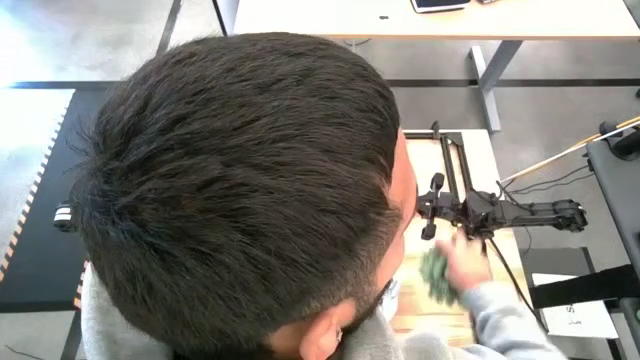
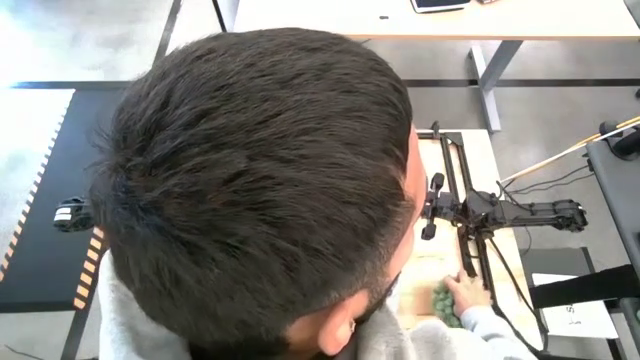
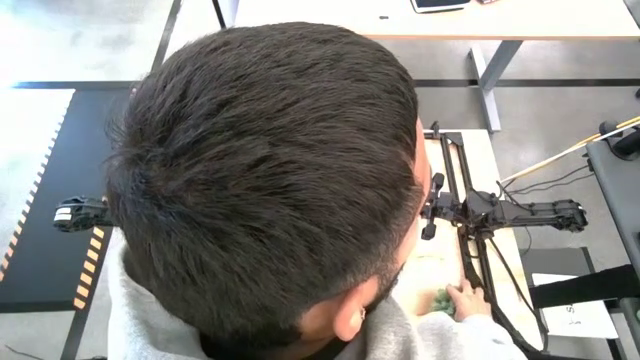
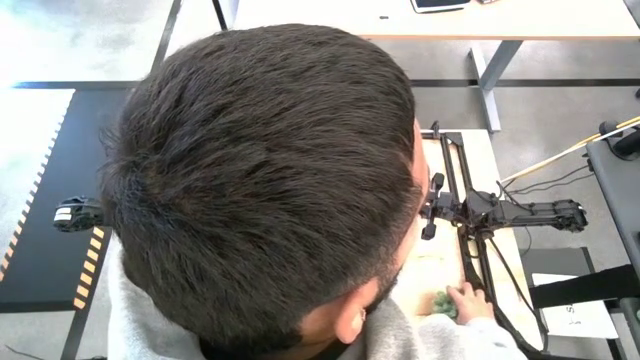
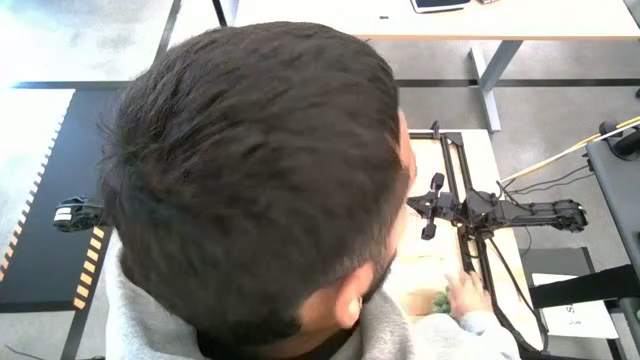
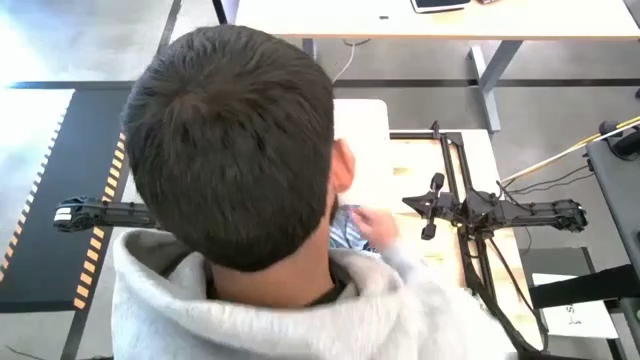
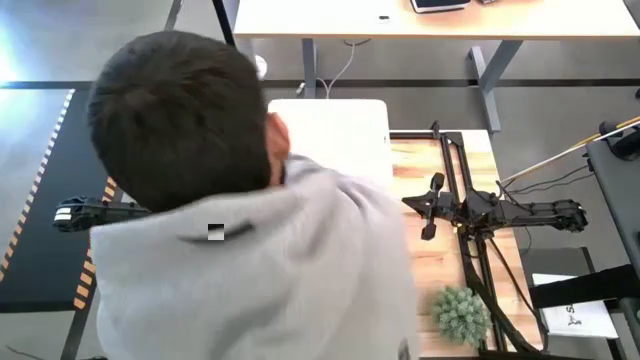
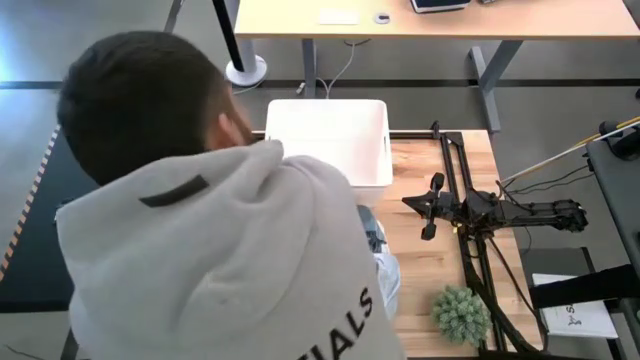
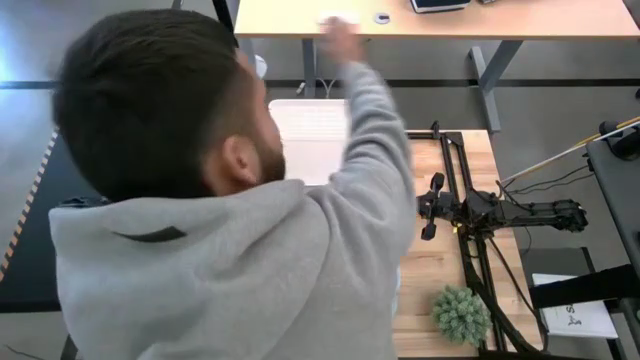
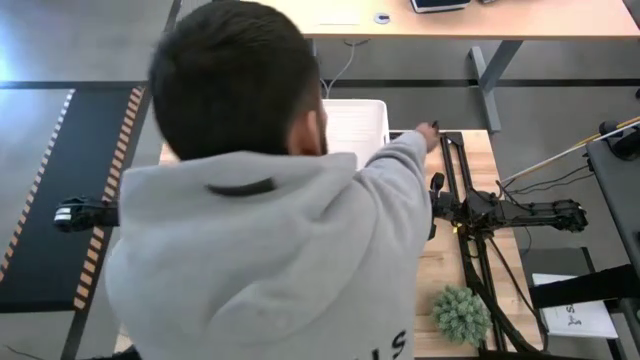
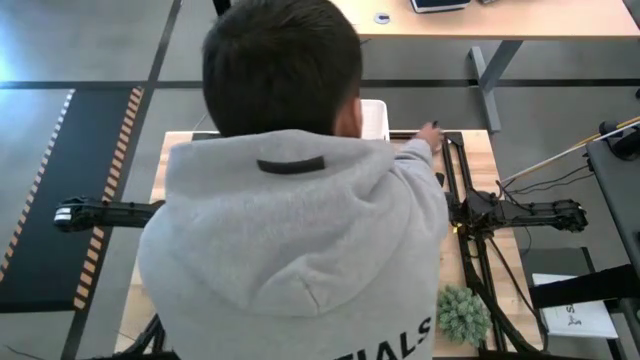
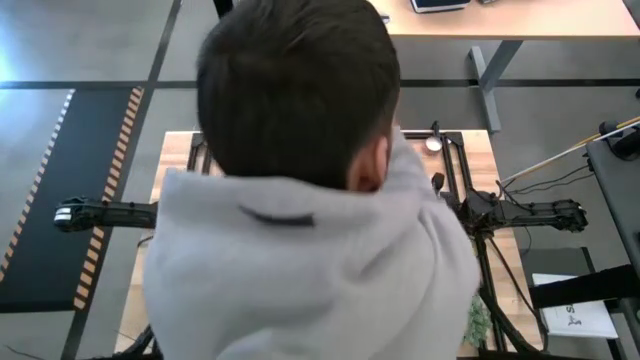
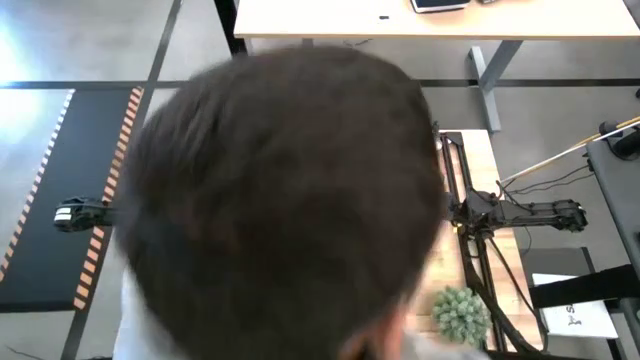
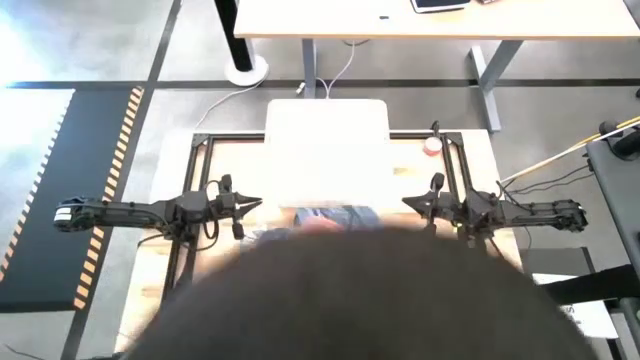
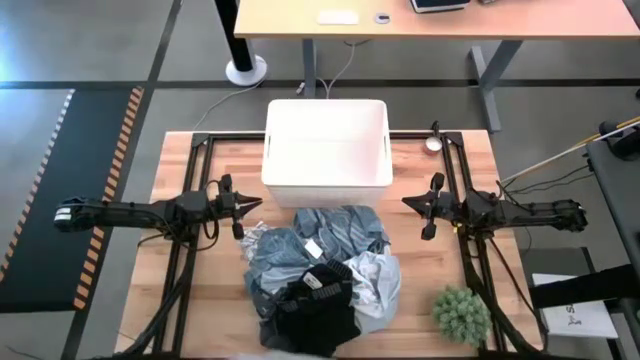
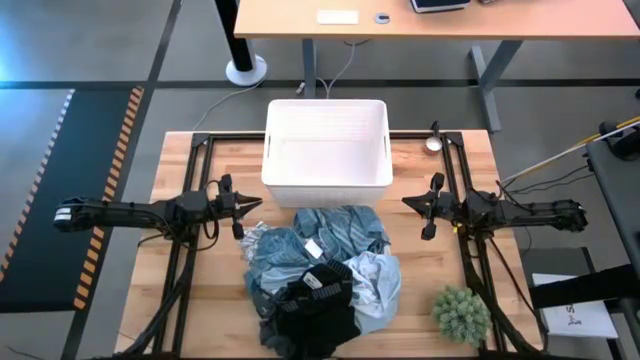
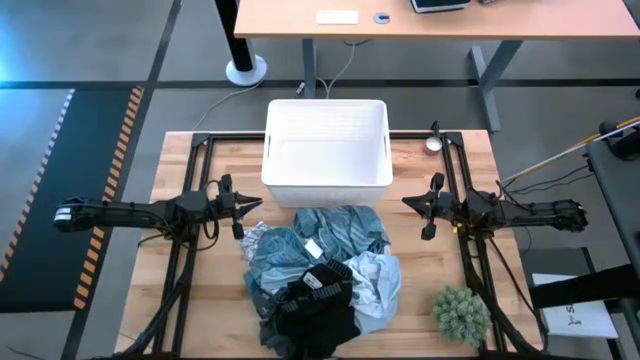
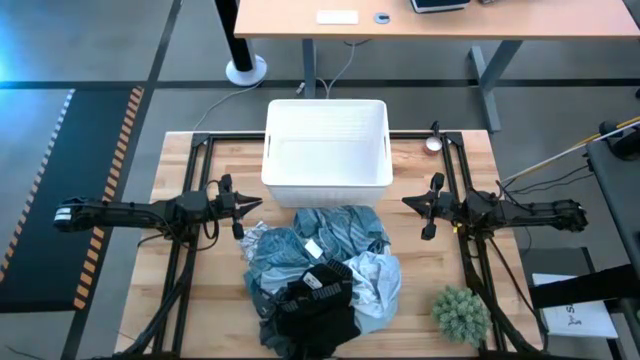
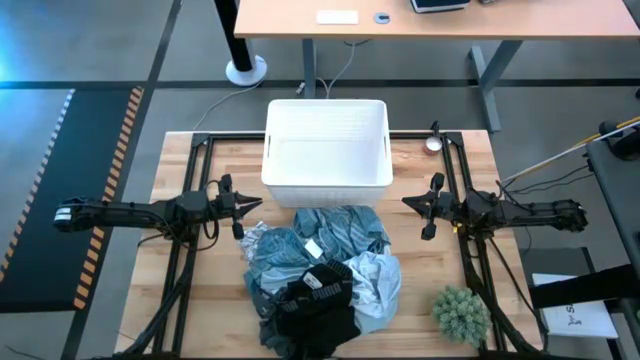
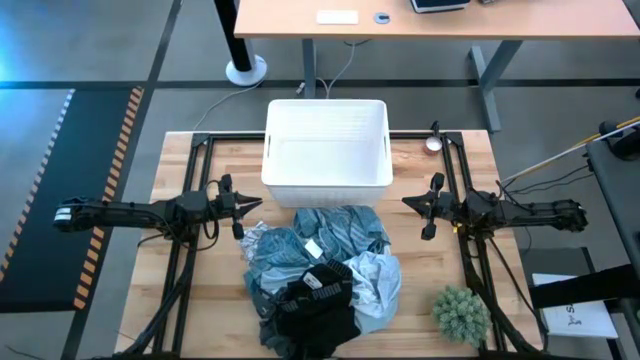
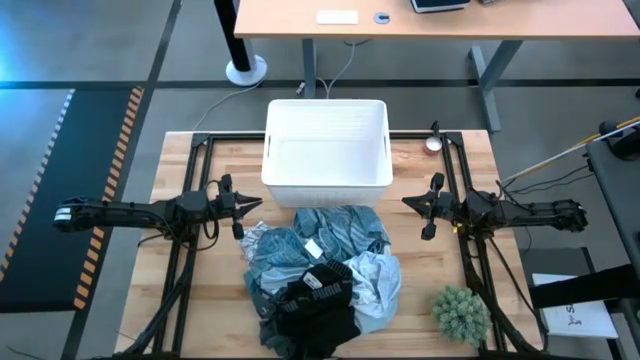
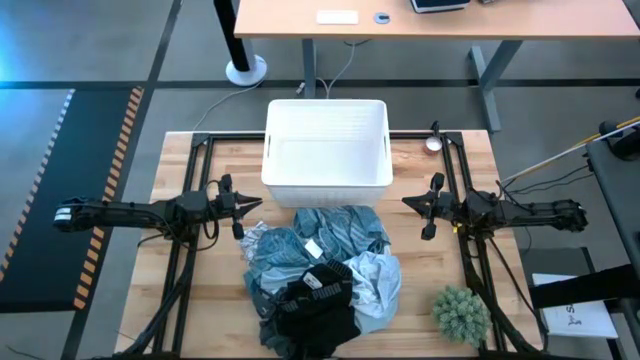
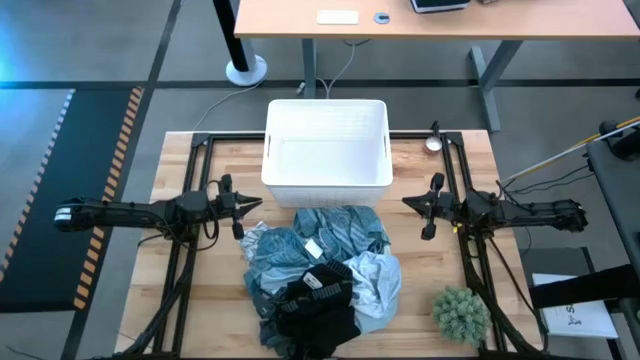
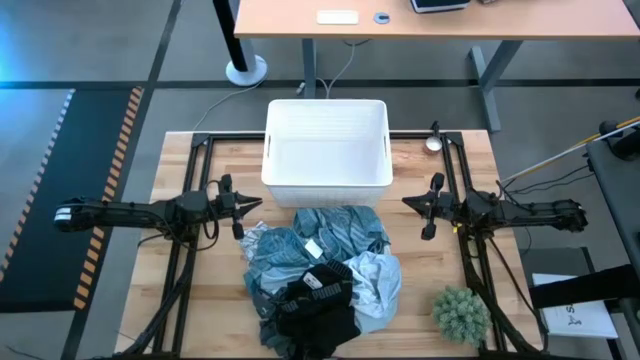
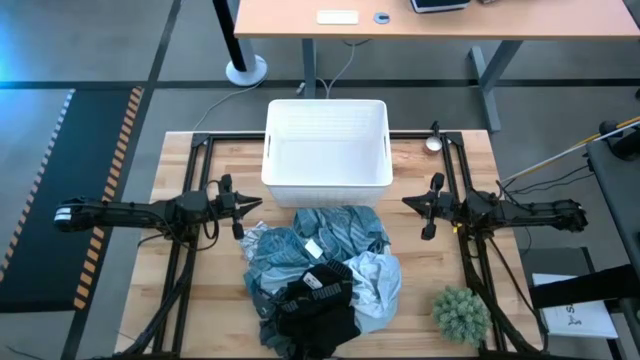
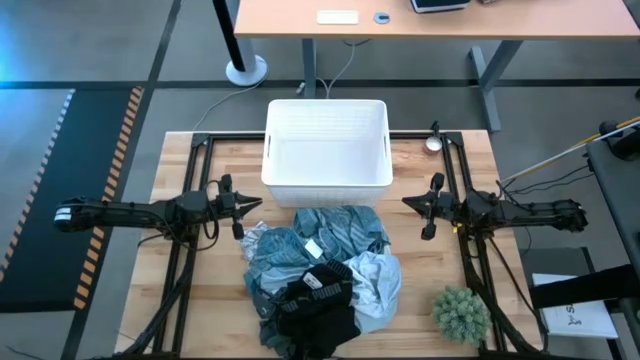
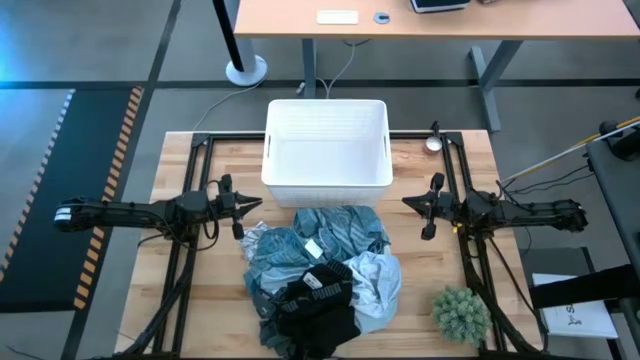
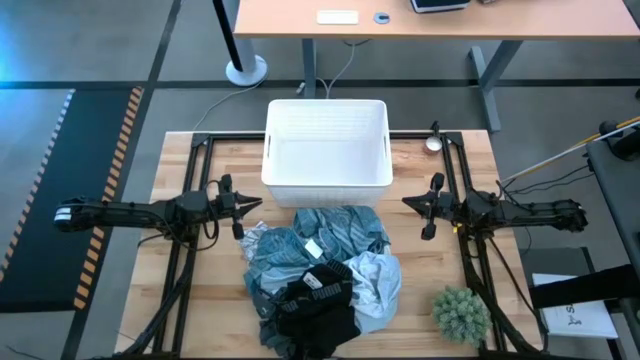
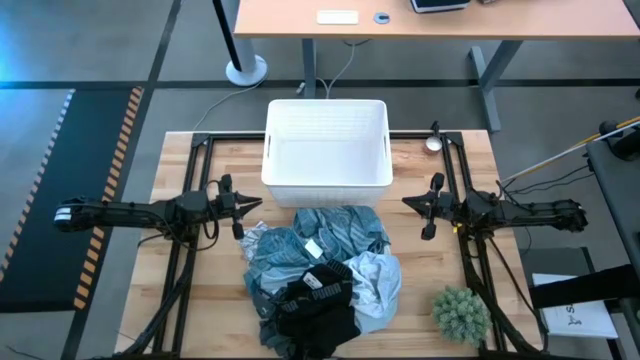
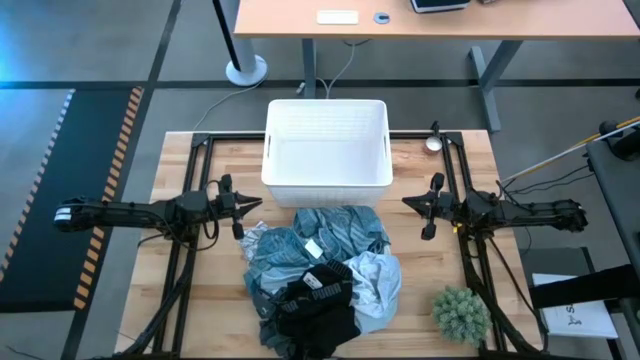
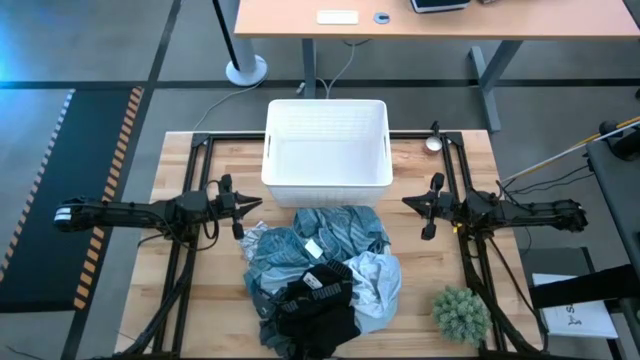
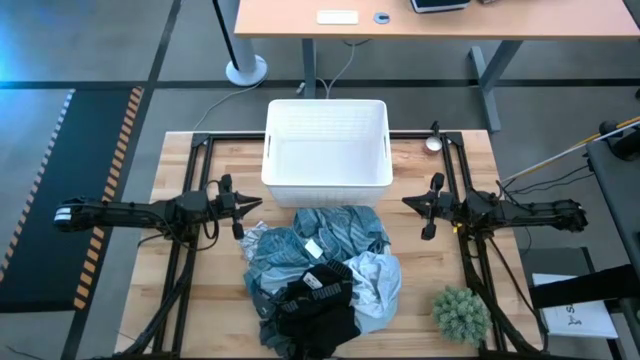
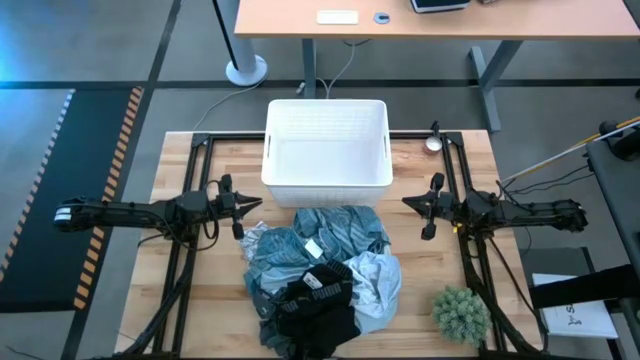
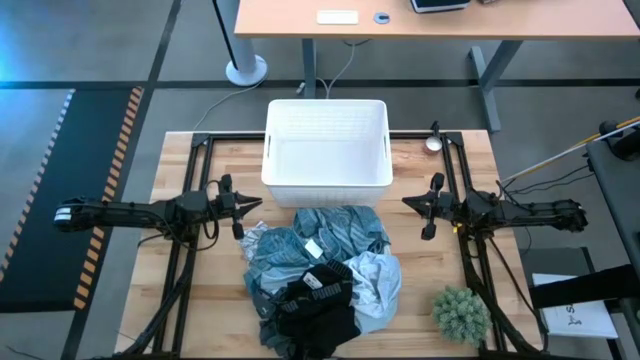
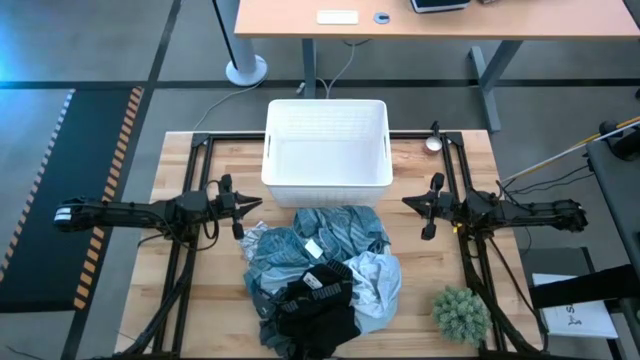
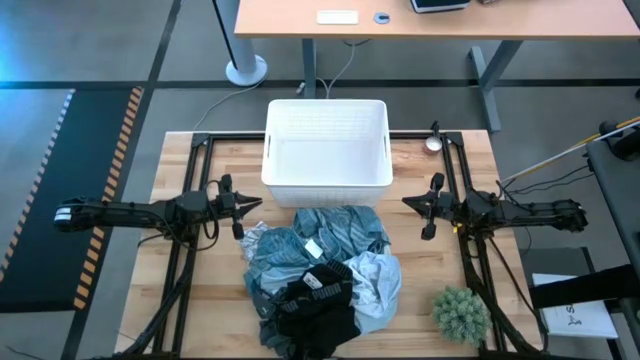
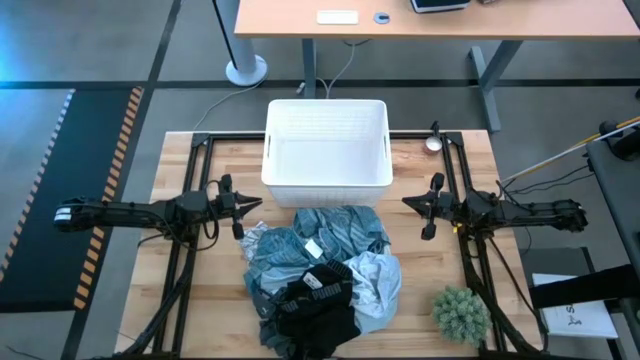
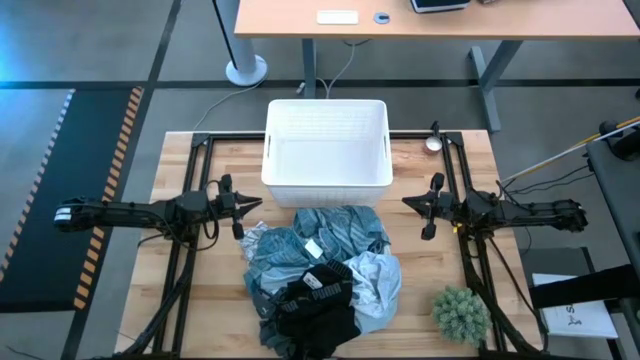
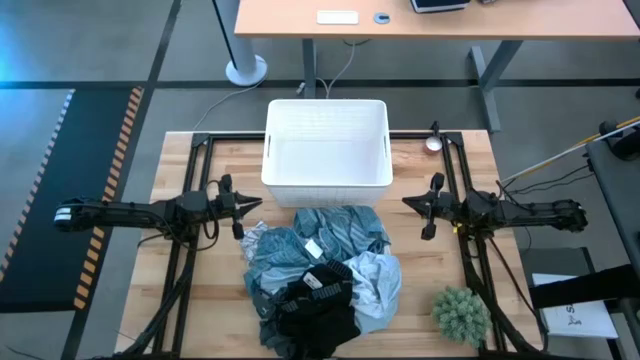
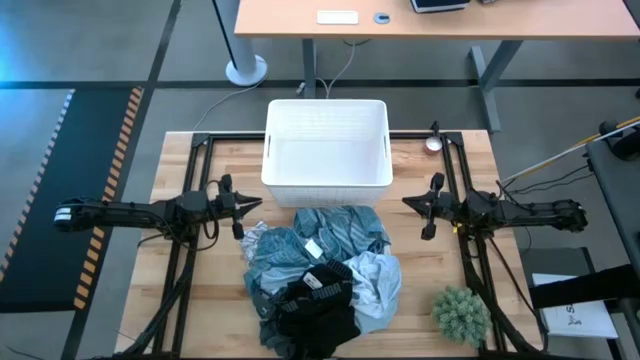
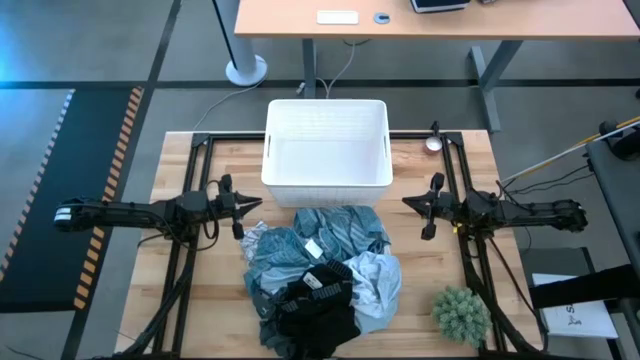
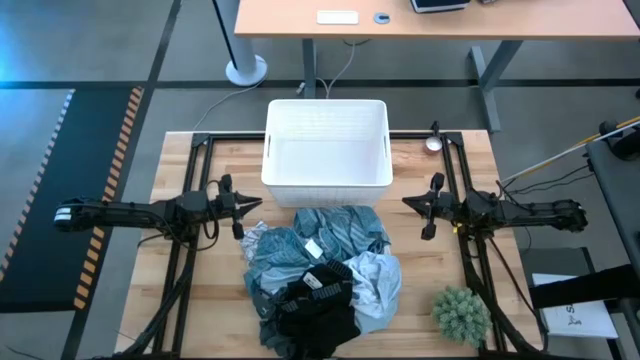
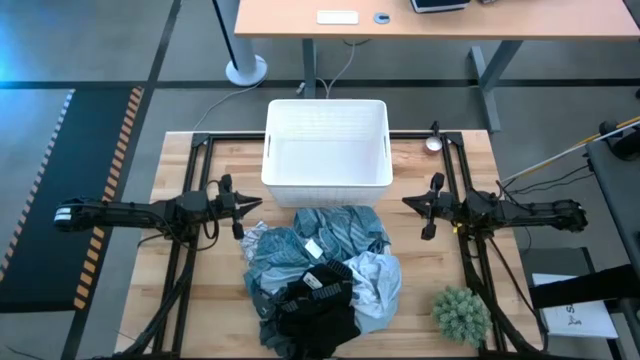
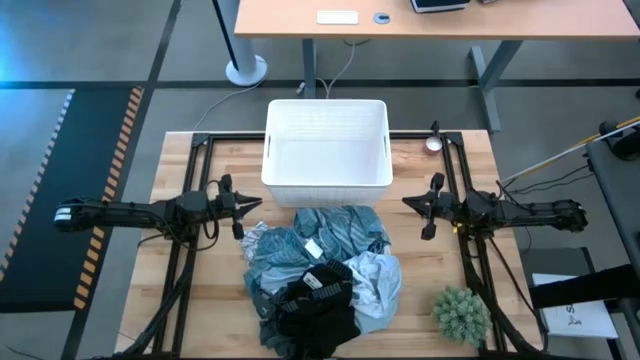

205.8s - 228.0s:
Task: Sort clothes
Return to Home Position
